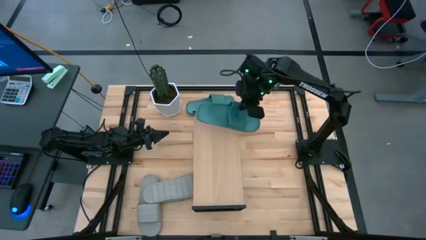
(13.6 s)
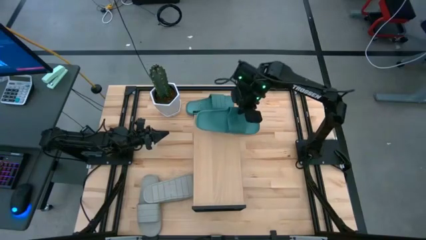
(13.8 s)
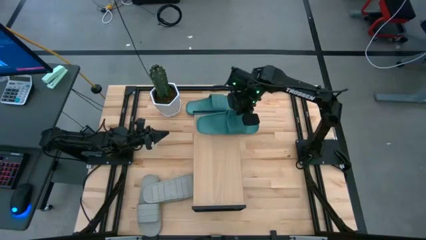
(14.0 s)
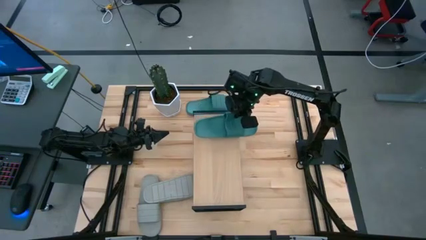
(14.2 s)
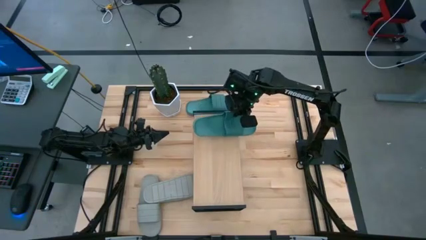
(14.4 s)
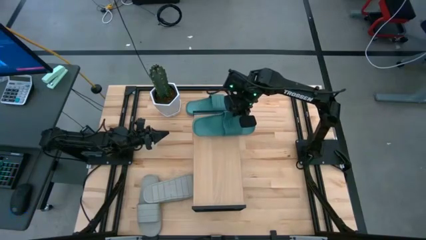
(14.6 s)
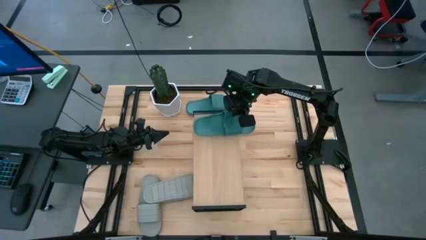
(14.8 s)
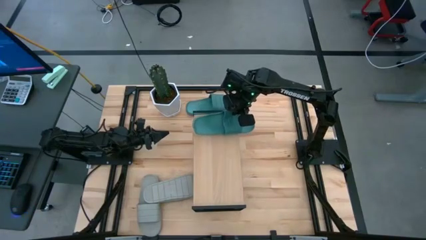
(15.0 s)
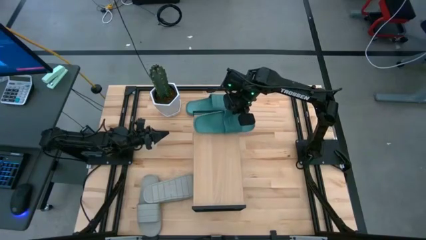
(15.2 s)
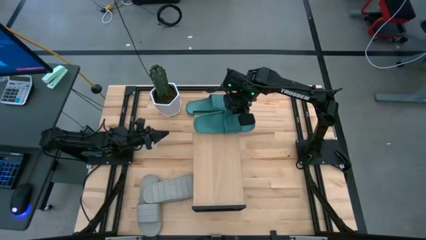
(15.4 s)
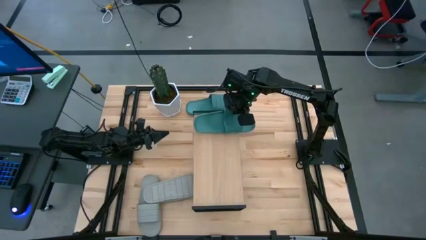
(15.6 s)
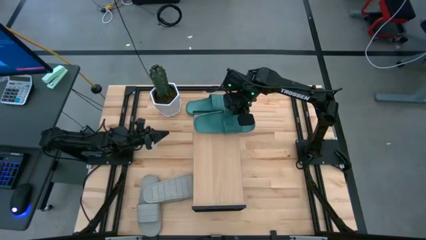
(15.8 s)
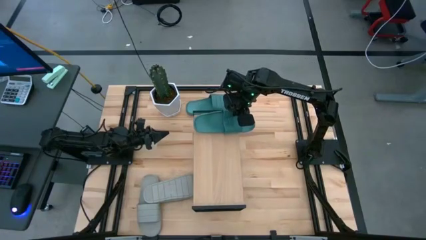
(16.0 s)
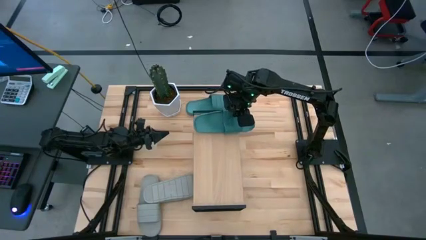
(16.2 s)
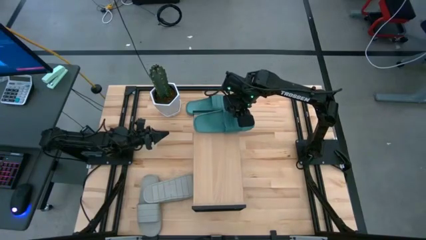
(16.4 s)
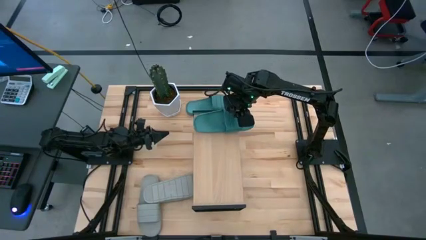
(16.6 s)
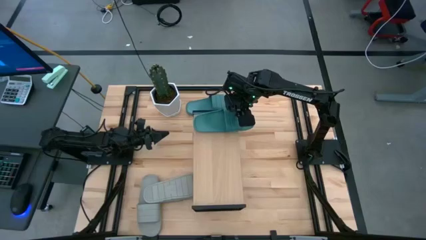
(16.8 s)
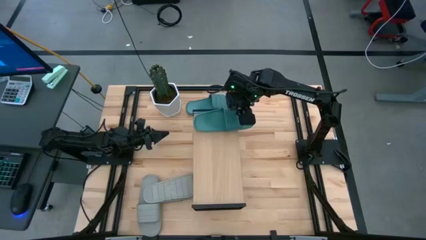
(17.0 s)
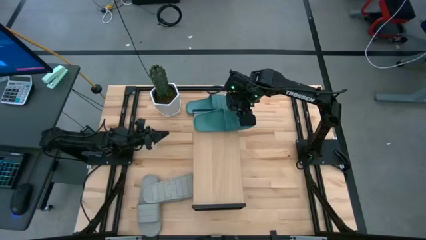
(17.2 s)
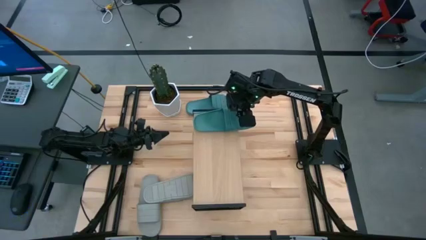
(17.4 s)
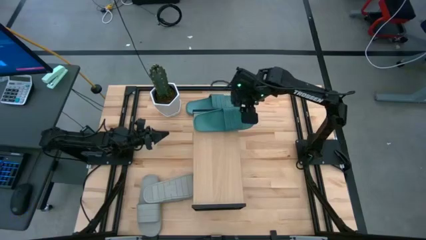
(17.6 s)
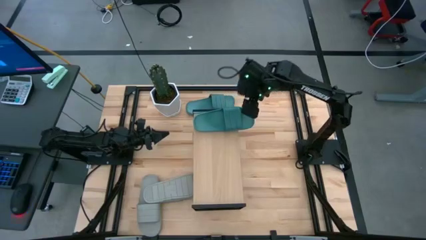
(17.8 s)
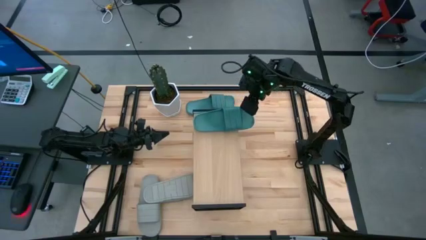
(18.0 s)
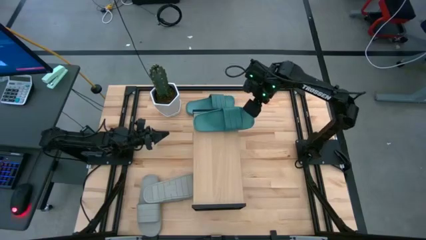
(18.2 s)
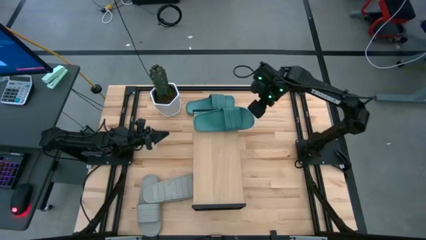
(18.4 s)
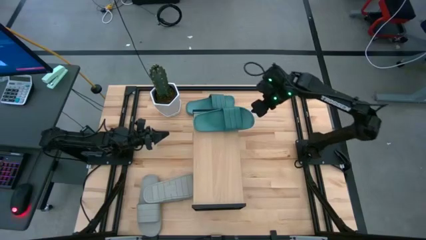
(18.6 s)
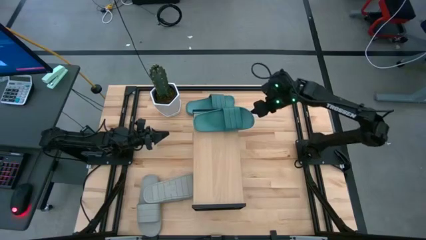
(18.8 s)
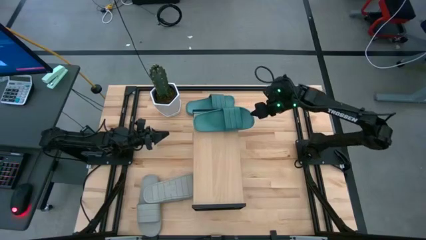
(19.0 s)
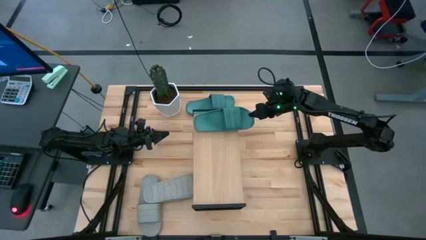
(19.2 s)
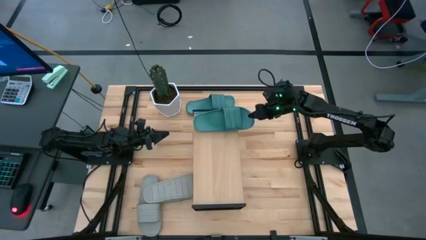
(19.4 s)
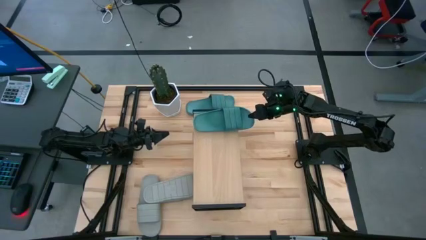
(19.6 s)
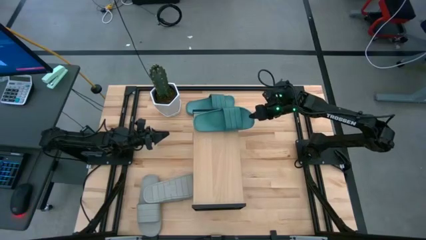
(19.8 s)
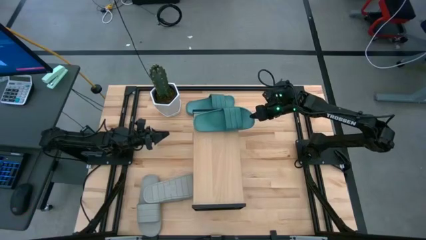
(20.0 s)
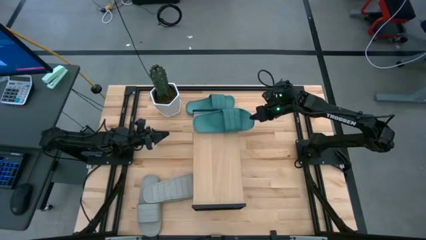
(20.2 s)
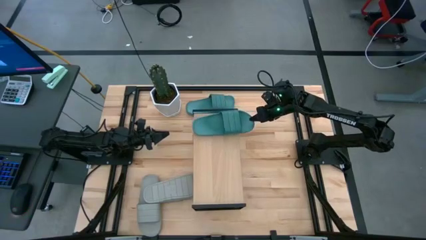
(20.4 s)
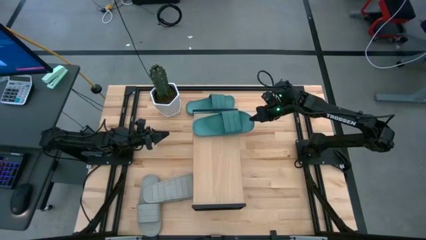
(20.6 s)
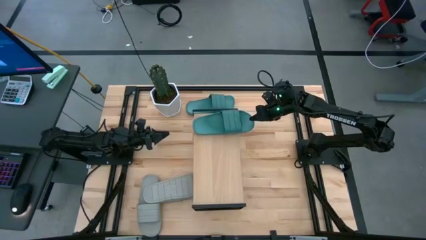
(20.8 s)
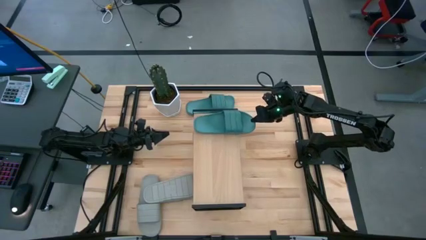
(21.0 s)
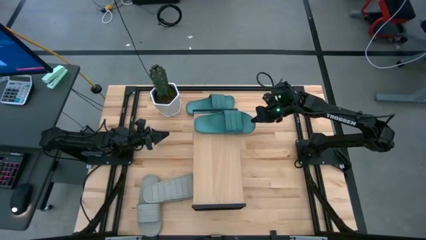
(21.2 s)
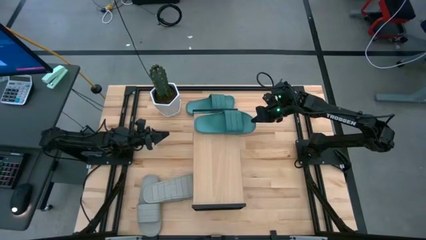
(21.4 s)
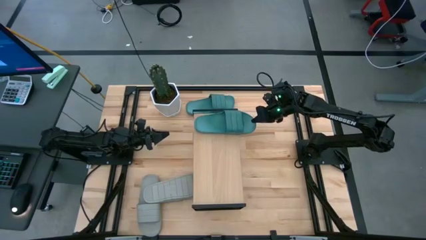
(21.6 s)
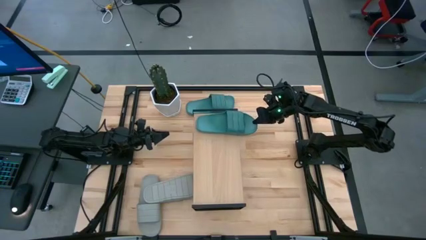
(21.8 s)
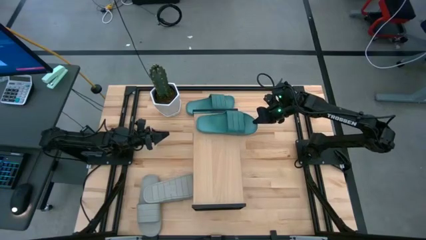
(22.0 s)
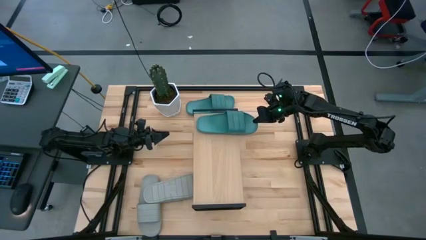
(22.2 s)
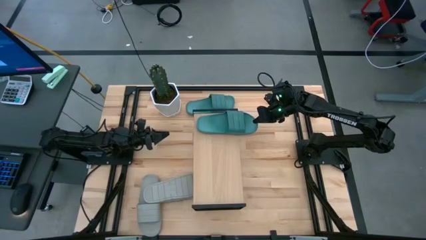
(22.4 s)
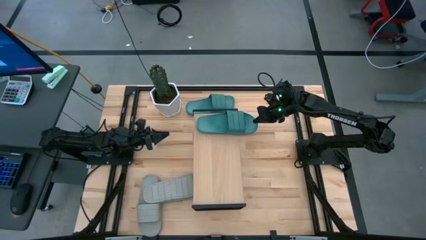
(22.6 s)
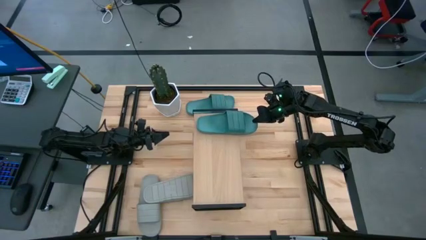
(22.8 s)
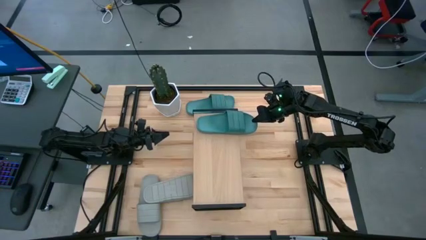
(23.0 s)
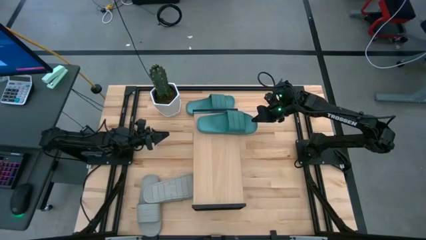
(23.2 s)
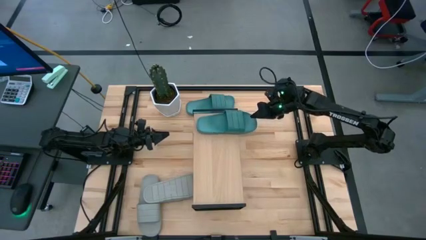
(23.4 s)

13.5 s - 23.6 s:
Task: Pick and place slides into the shelf
Put the right green slide on the shelf
